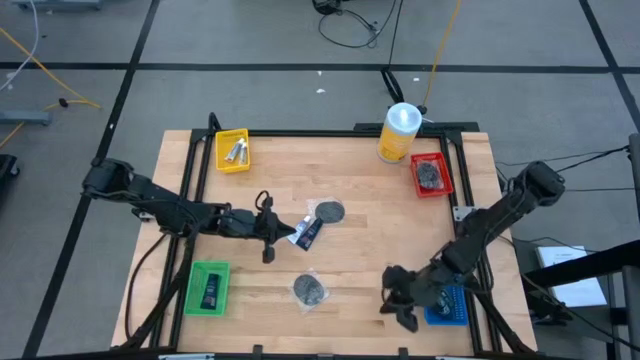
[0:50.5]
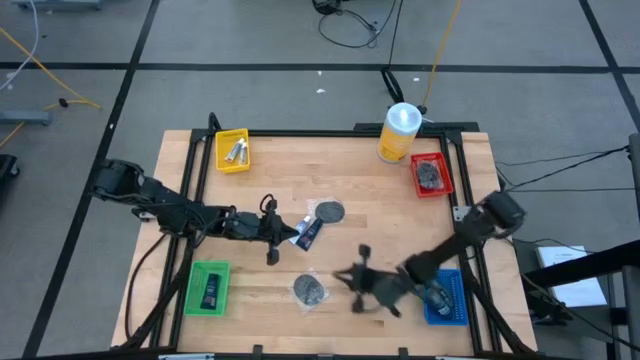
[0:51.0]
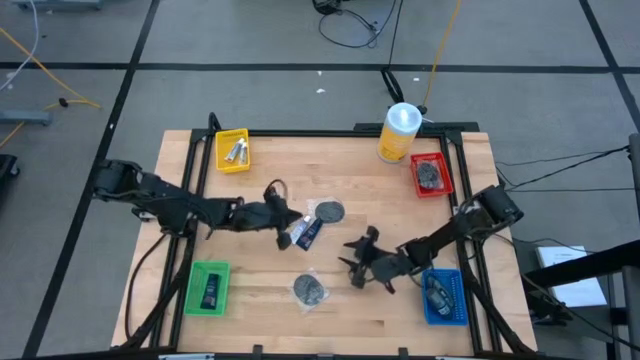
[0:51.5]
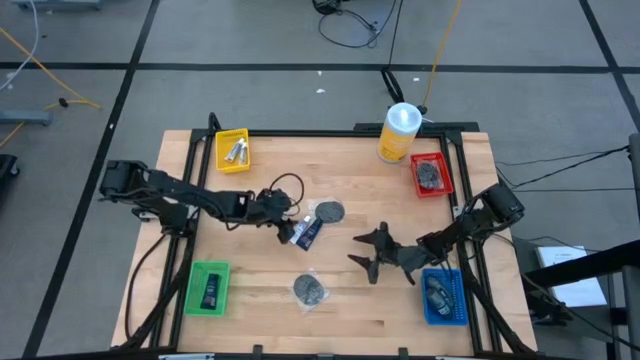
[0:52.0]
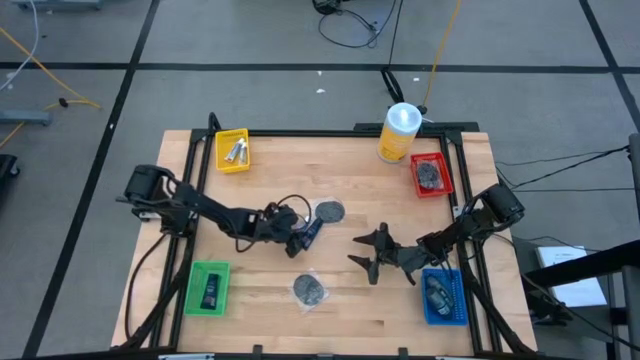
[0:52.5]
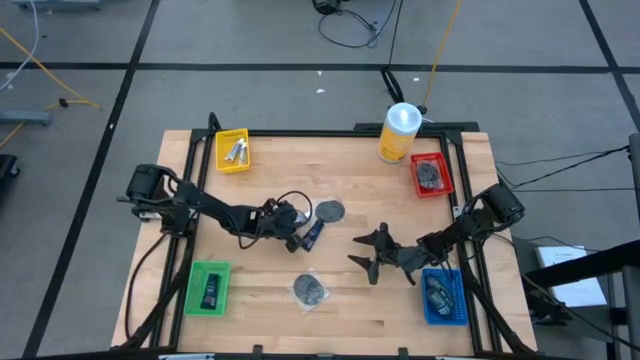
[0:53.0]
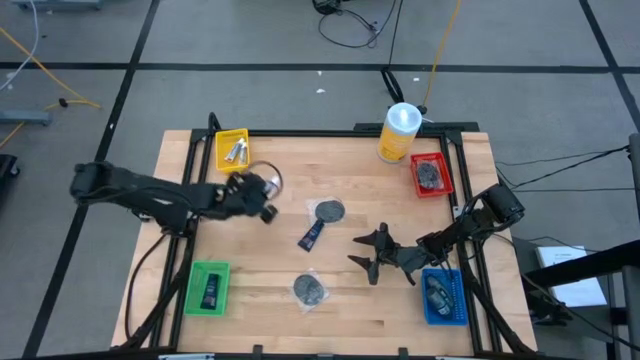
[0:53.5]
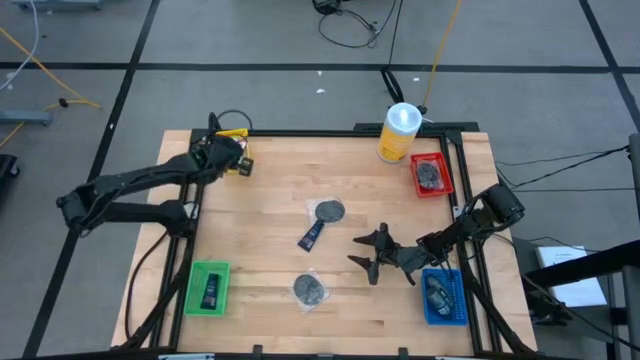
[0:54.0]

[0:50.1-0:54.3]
Task: Pick & Place Travel size toiletries
Put the white toothpaste into the yellow bin

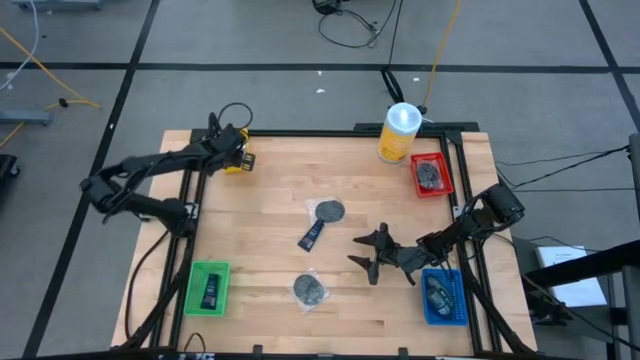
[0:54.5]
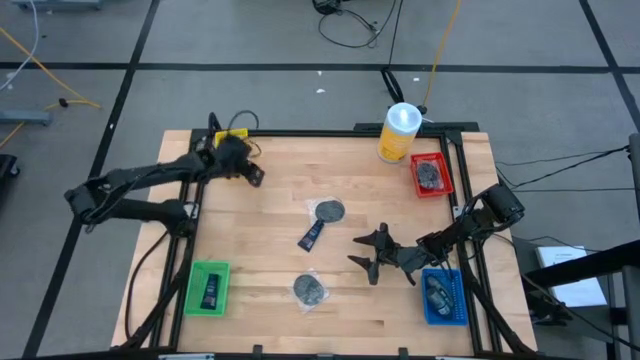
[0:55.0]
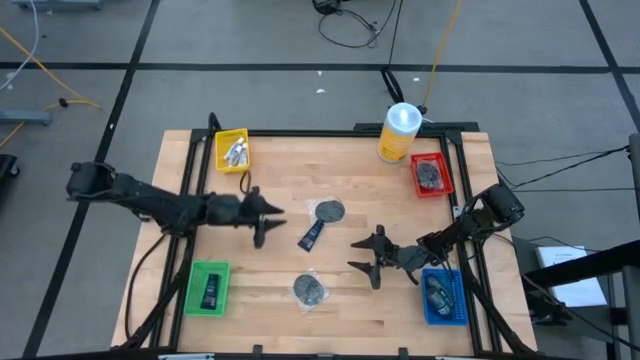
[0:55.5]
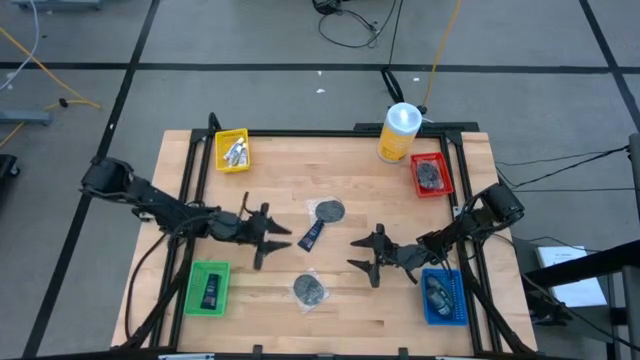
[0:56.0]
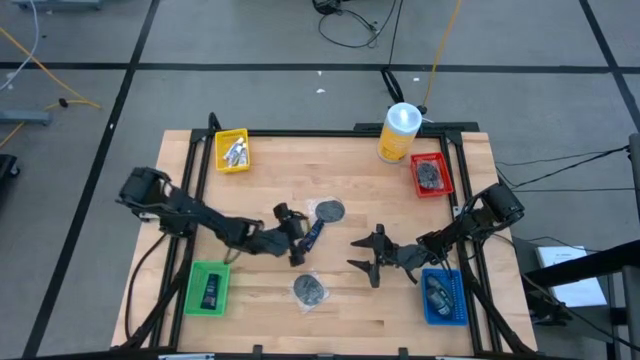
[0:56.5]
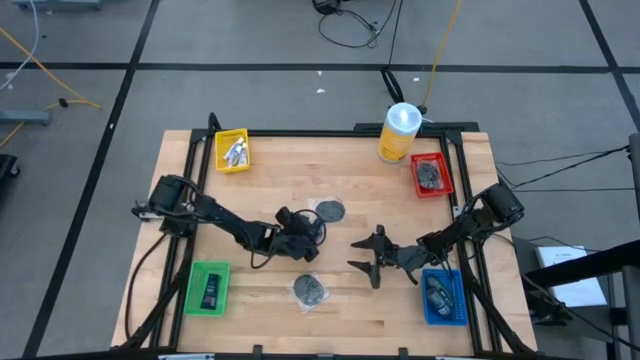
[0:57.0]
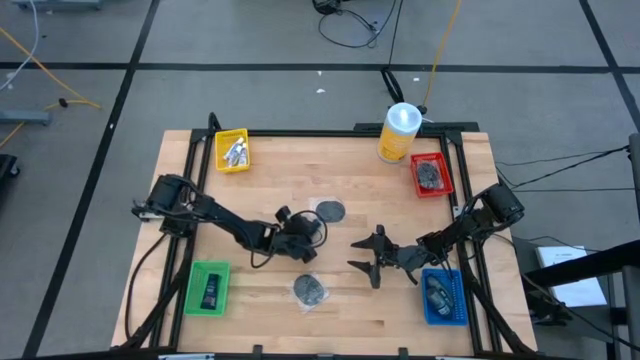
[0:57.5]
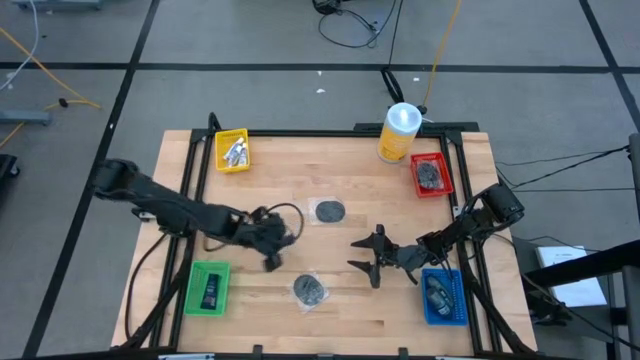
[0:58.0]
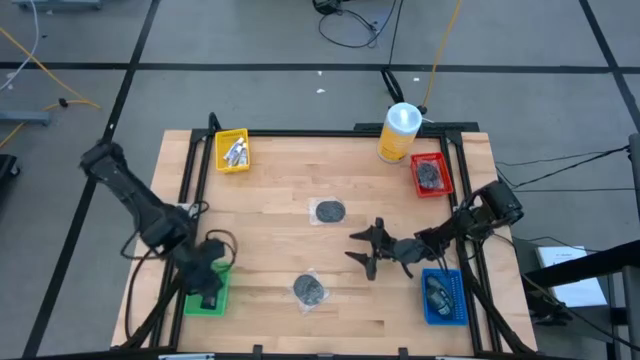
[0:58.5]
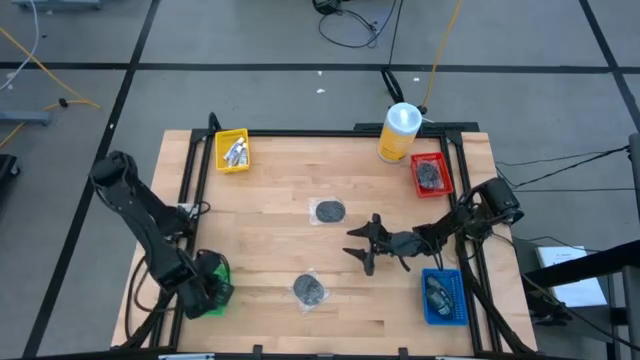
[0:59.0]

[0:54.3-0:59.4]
Put the dark blue shave cream into the green bin

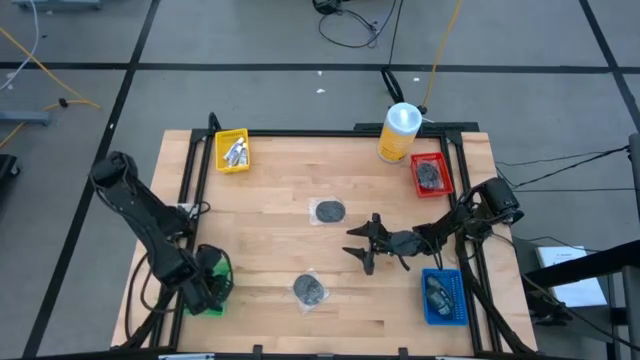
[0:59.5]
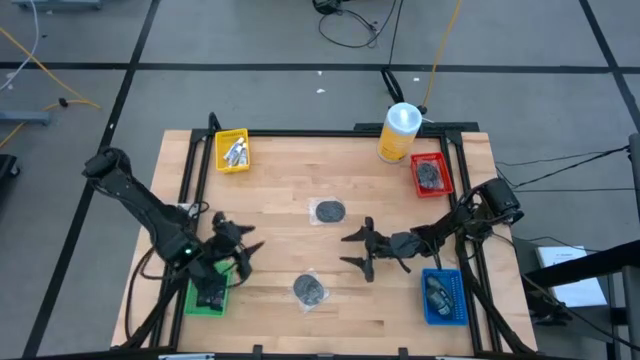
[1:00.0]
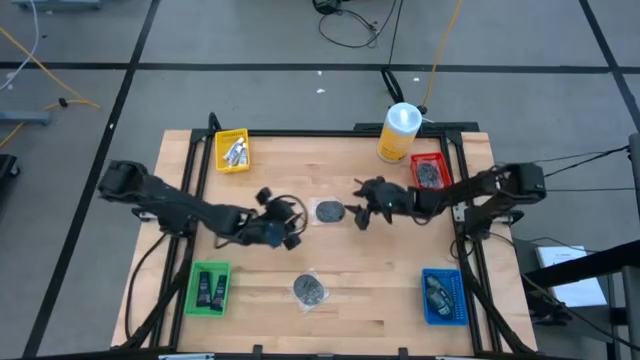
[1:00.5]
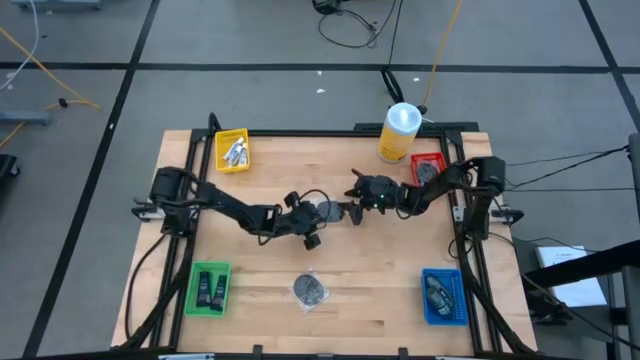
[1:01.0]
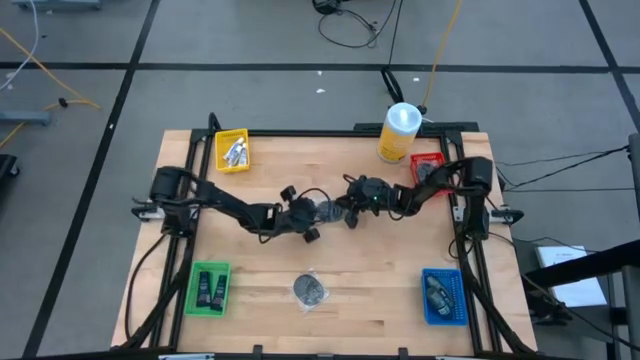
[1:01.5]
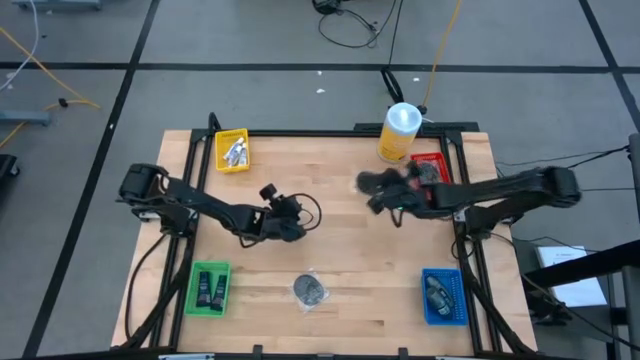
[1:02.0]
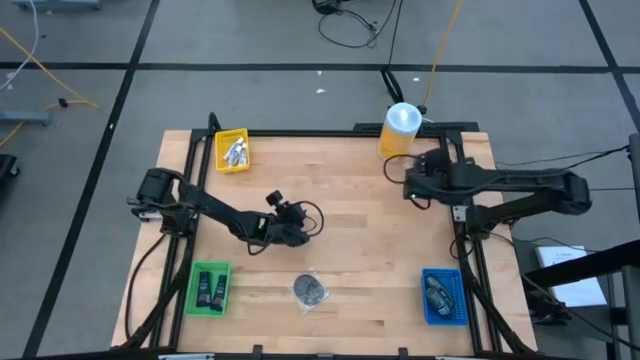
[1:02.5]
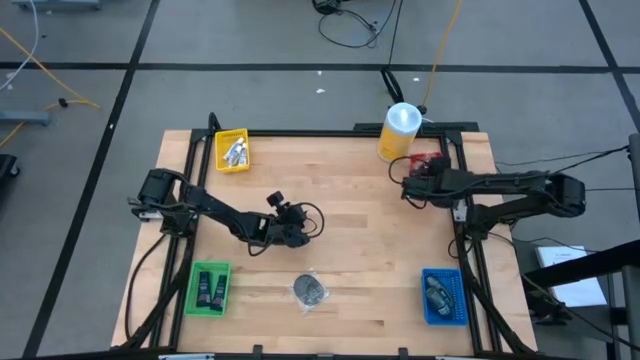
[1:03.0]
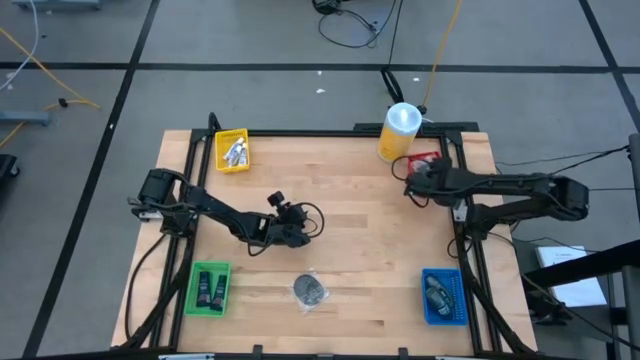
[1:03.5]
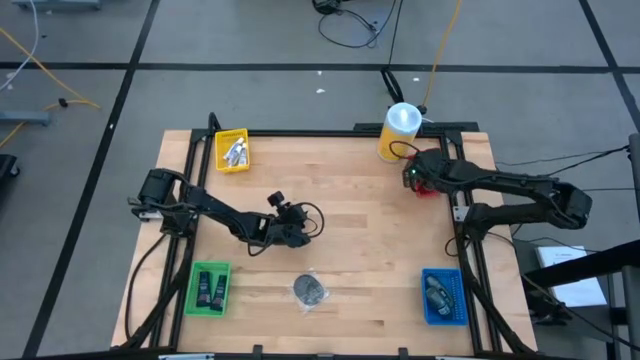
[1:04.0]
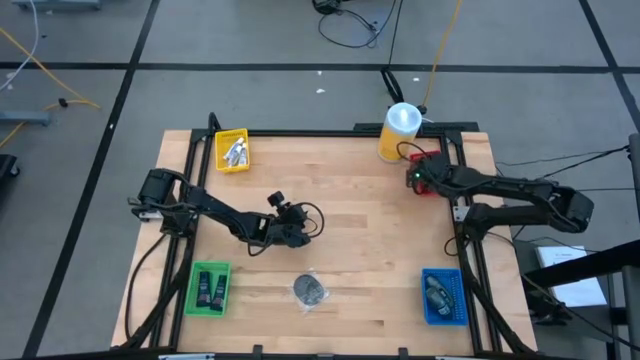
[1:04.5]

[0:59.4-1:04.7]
Put the black hairbrush into the red bin

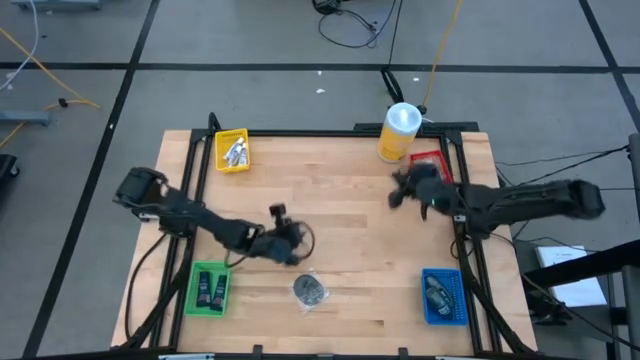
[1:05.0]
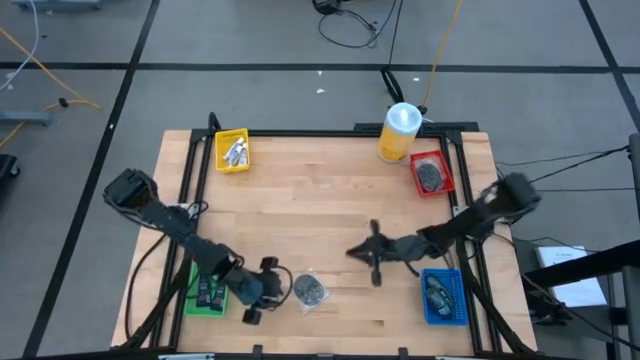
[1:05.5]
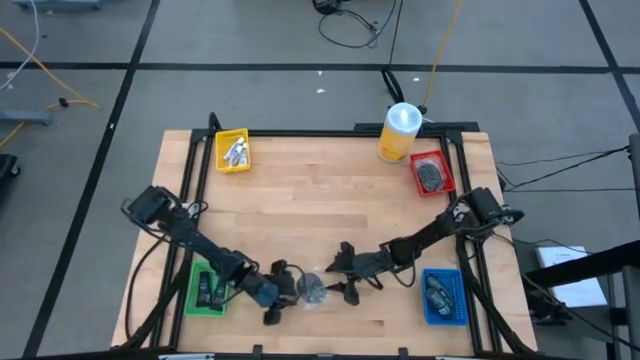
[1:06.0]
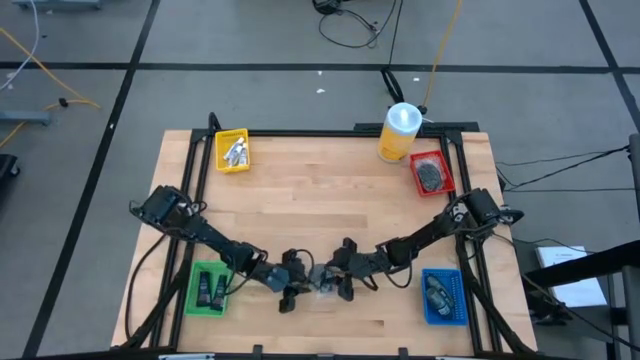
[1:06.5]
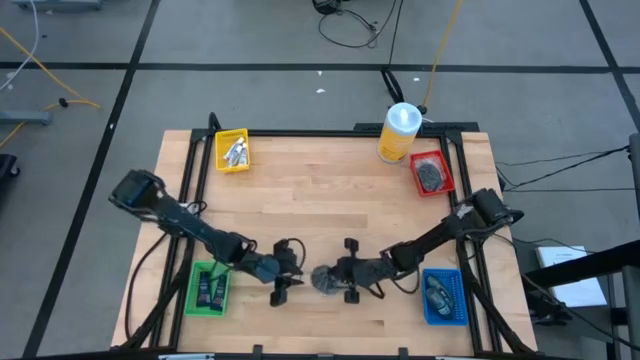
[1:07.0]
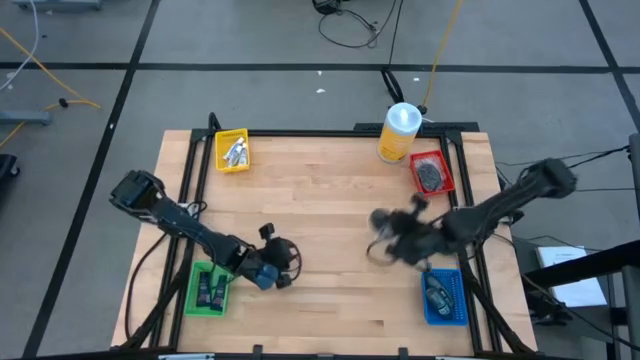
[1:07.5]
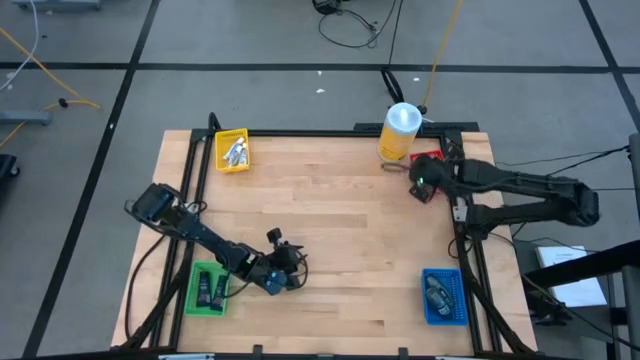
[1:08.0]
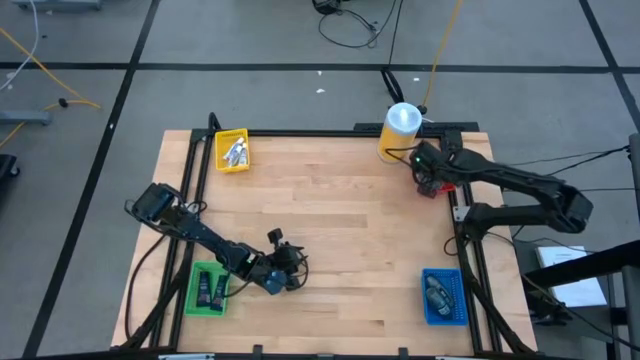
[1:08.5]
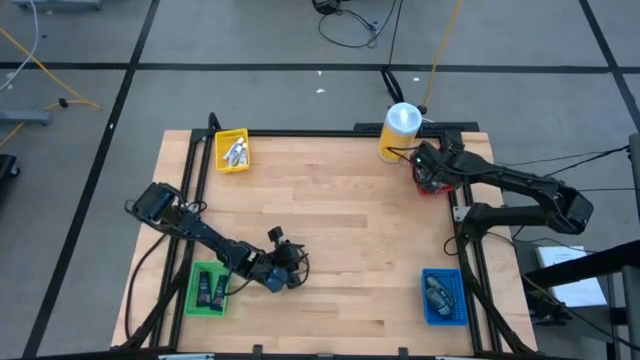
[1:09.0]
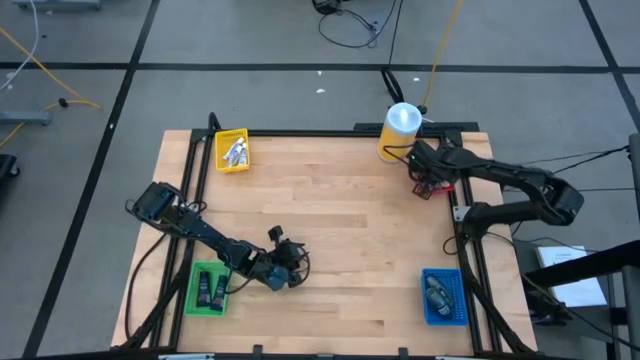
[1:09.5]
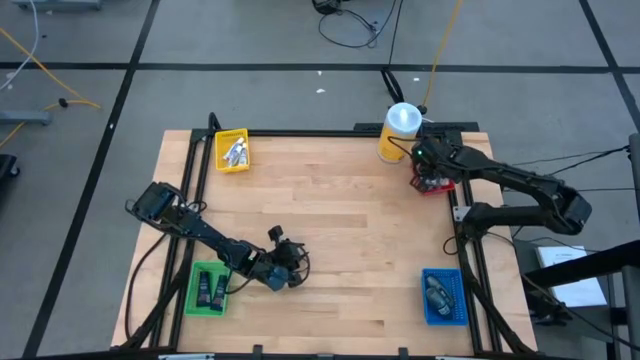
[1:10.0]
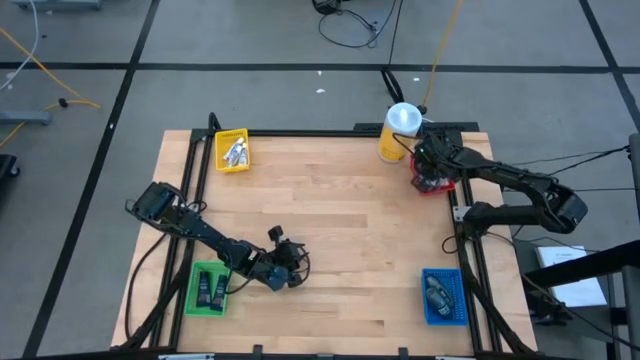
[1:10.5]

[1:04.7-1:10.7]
Put the black hairbrush into the red bin
